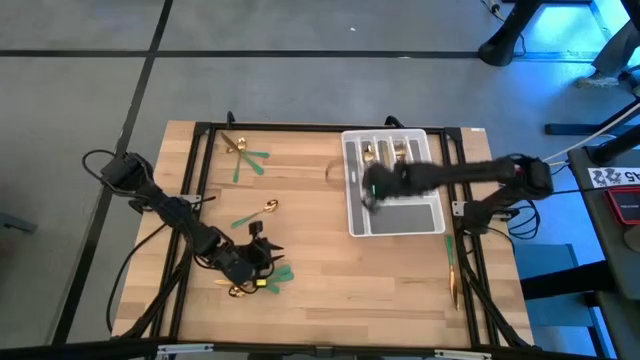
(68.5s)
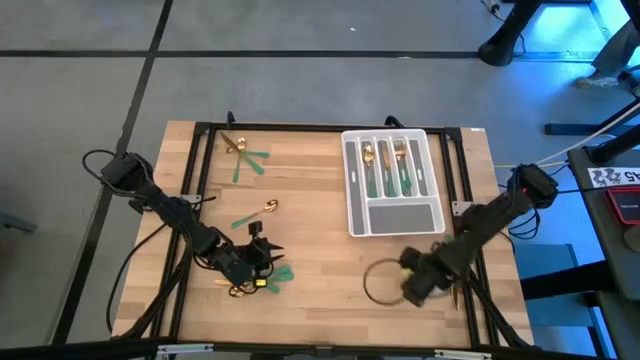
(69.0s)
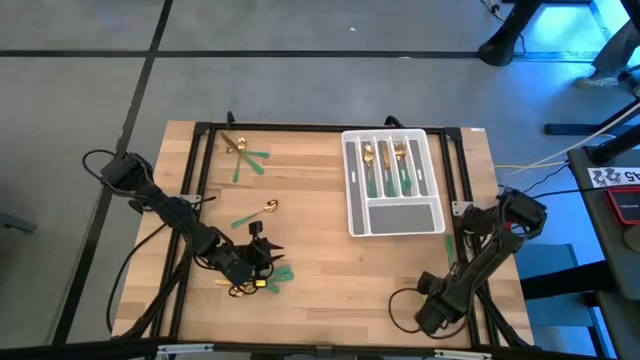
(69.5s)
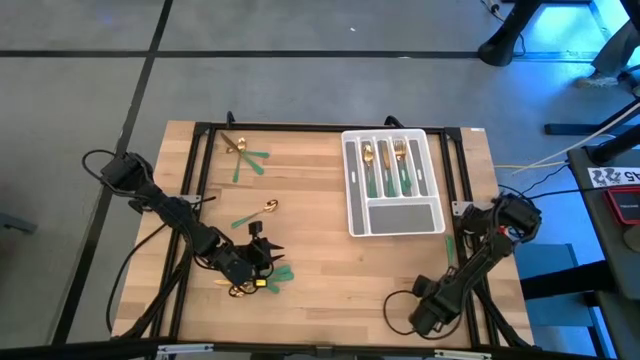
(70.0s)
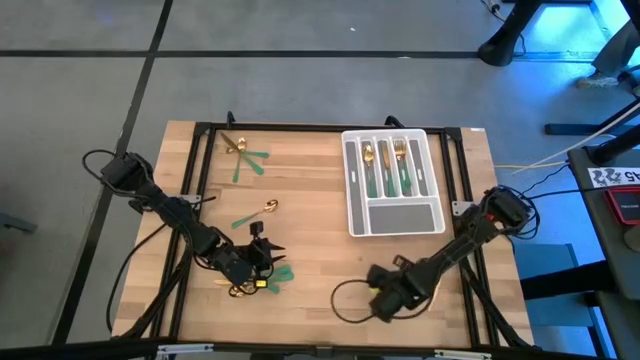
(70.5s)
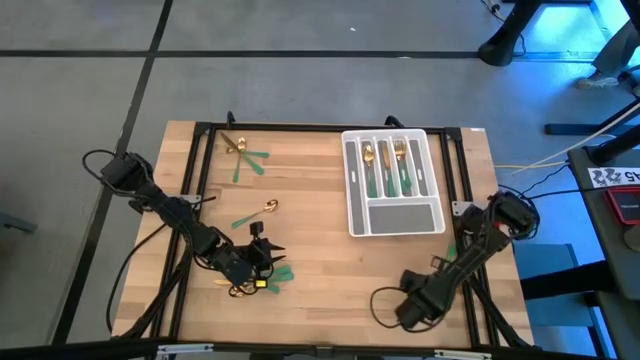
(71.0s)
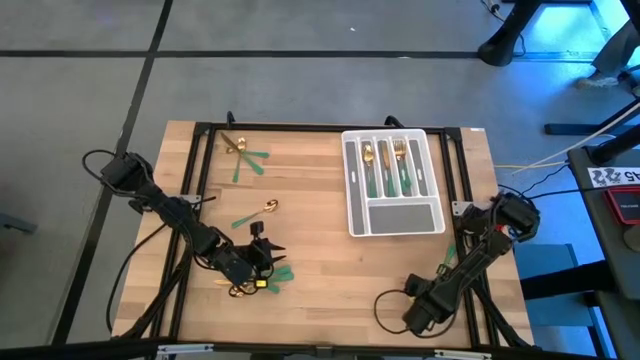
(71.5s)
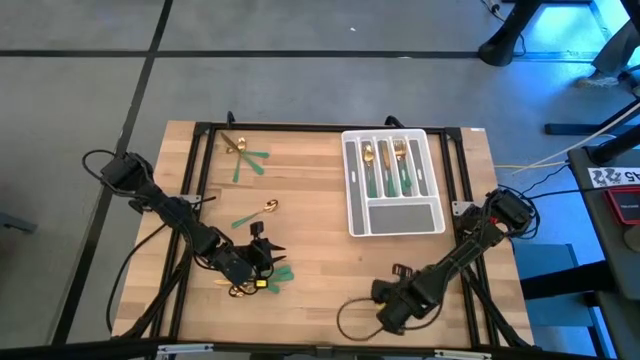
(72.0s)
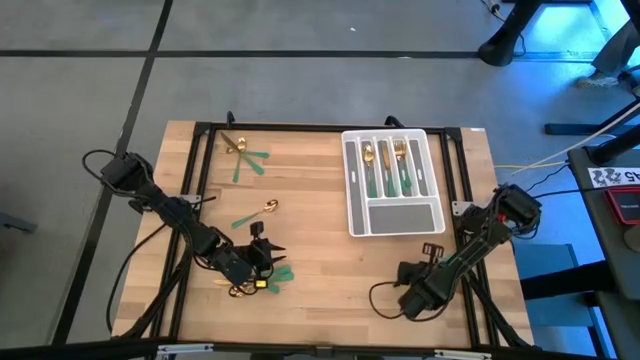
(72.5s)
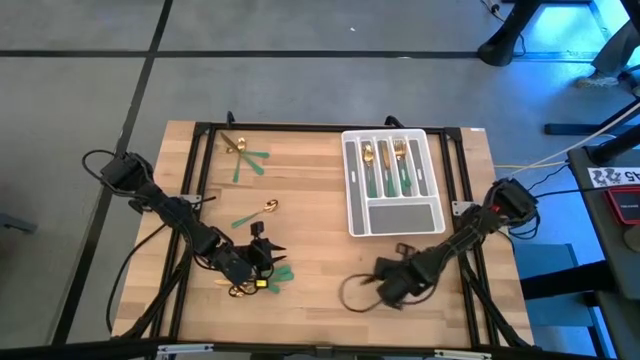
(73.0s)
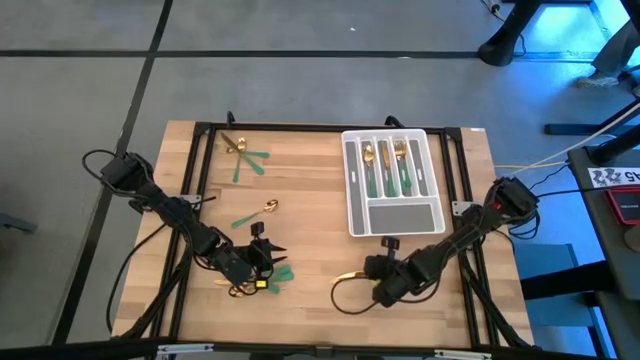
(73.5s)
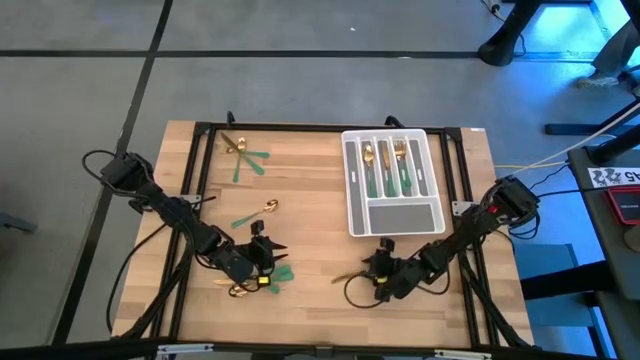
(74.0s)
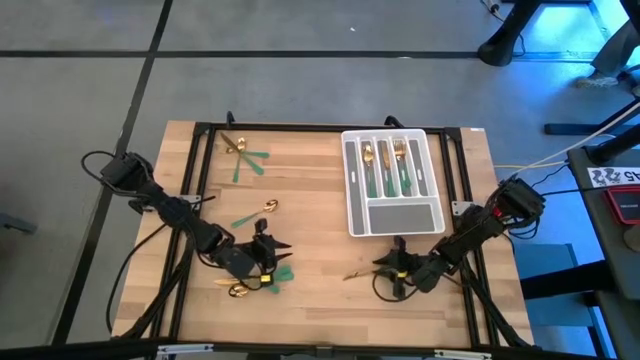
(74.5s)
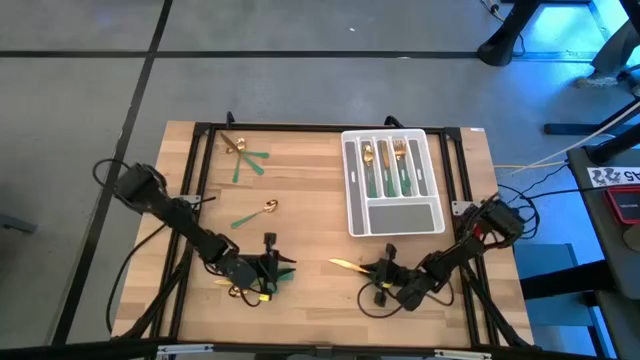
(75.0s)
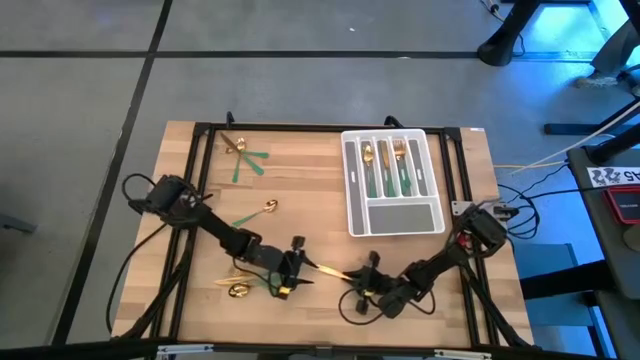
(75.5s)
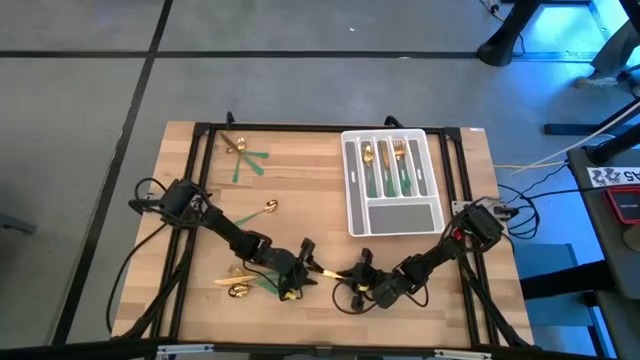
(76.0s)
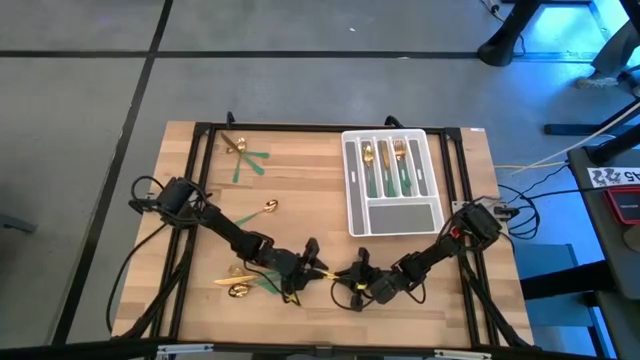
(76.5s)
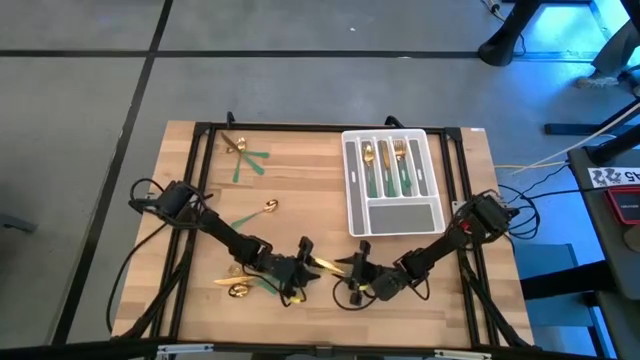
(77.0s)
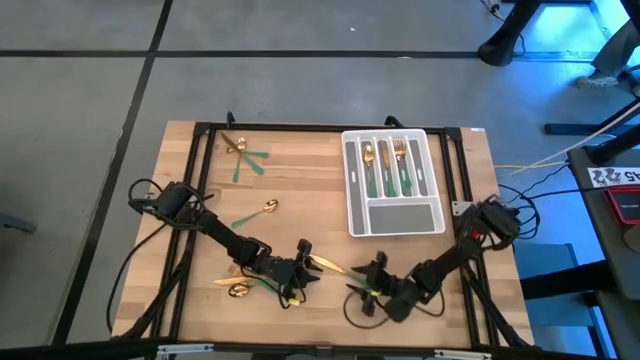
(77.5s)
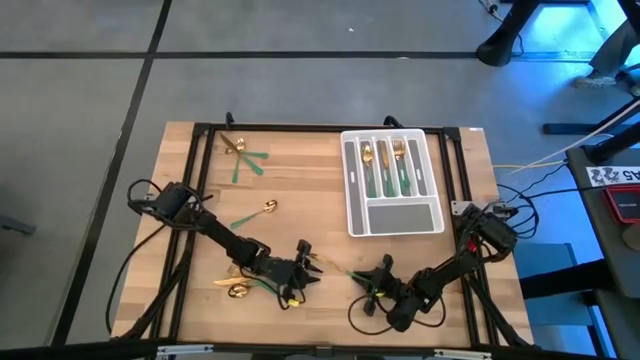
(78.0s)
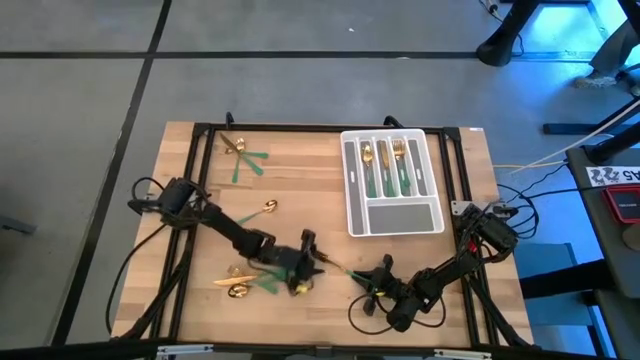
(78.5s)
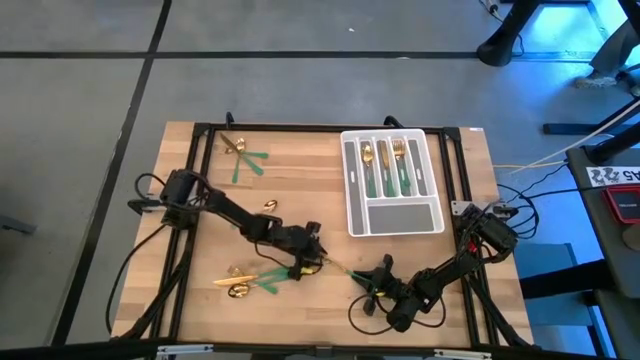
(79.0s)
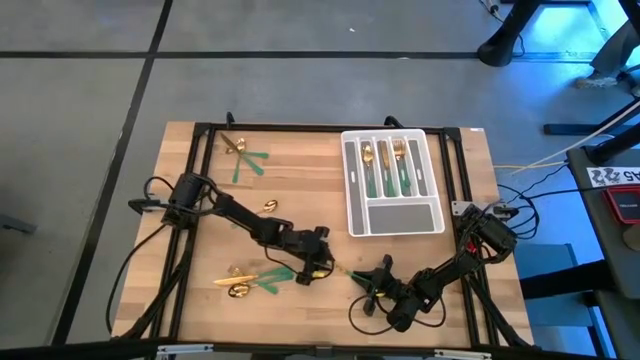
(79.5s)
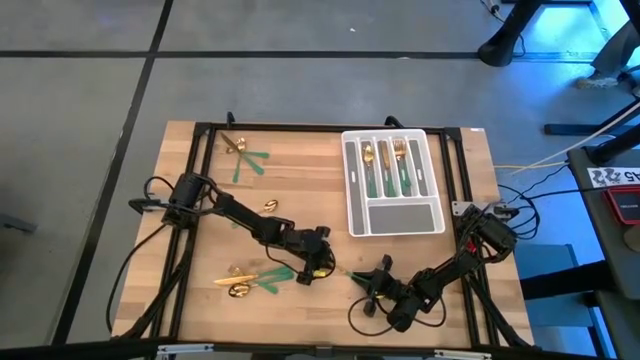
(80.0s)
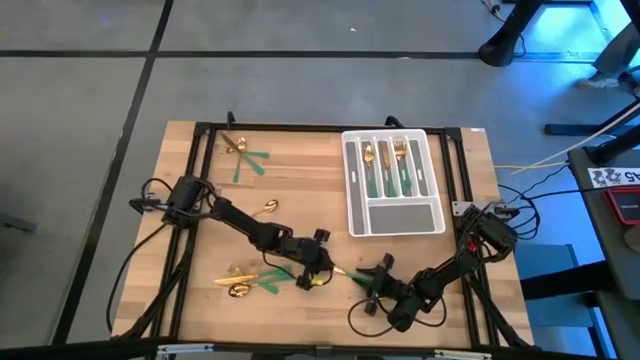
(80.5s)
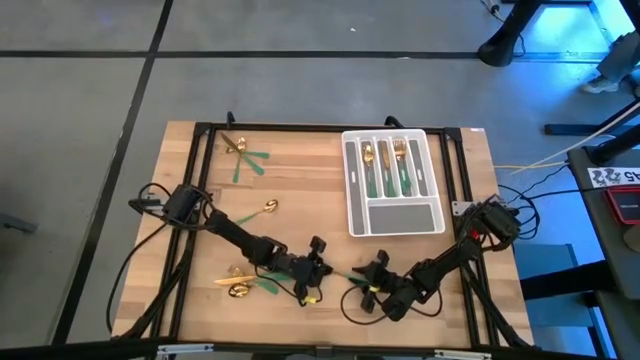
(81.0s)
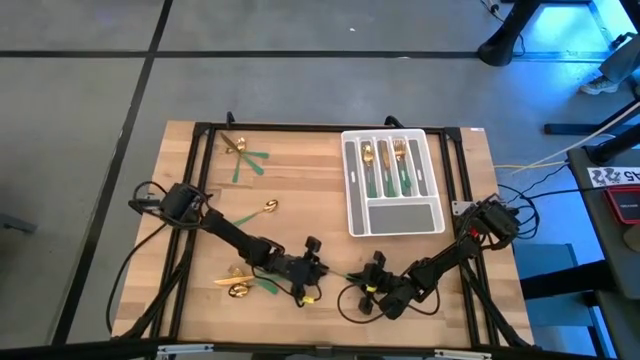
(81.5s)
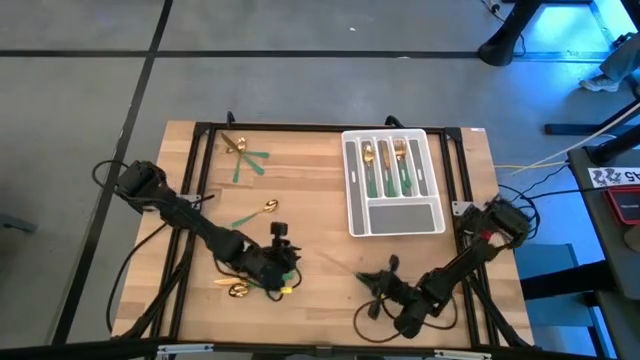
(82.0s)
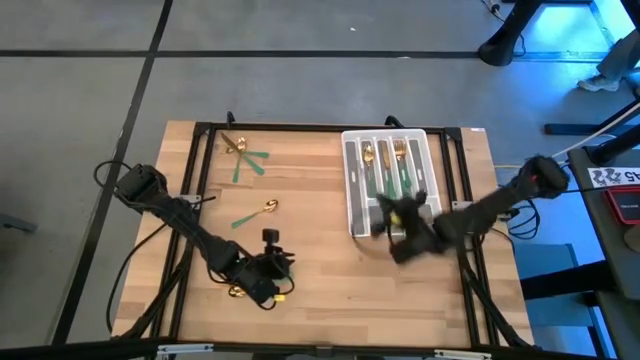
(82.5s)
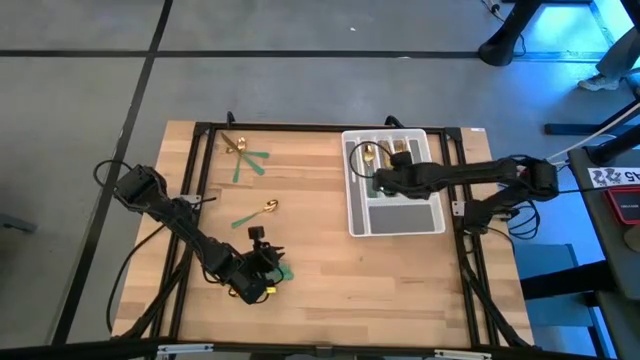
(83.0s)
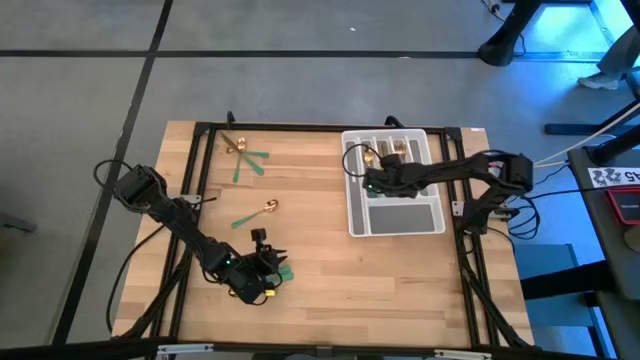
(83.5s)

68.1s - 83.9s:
Task: Sort silverware
Put the green table knife into the silverware tray

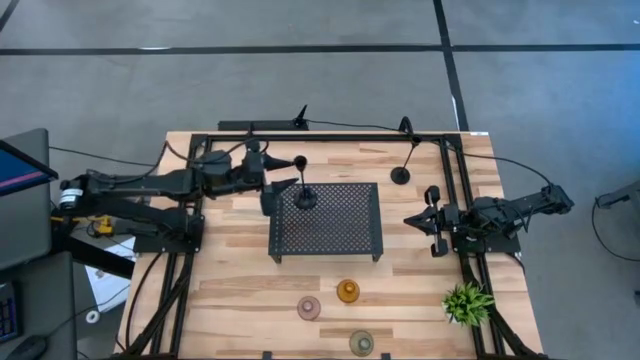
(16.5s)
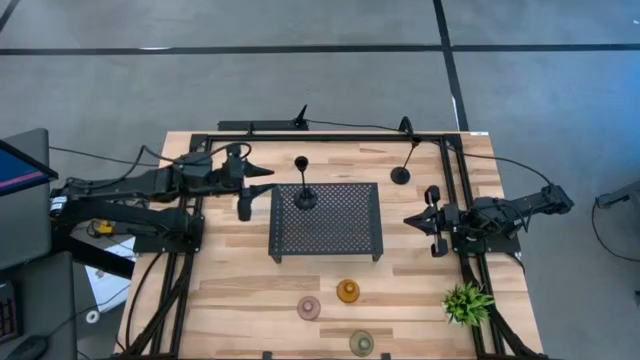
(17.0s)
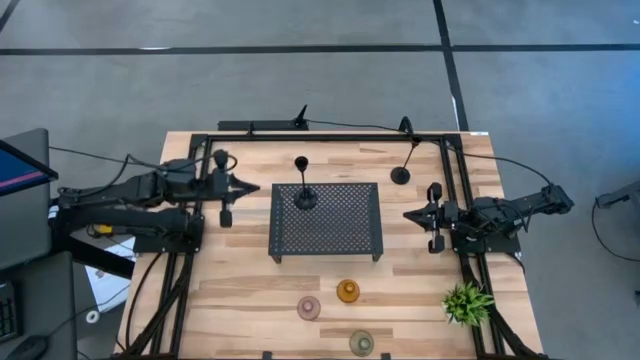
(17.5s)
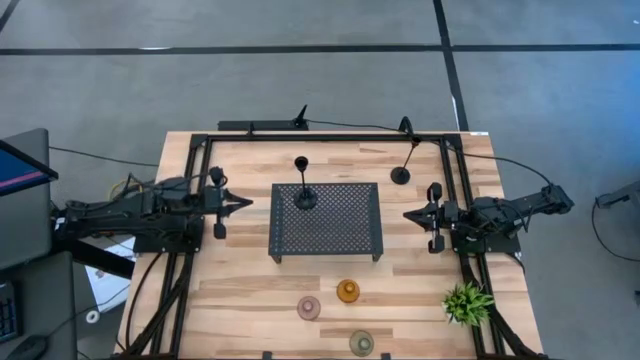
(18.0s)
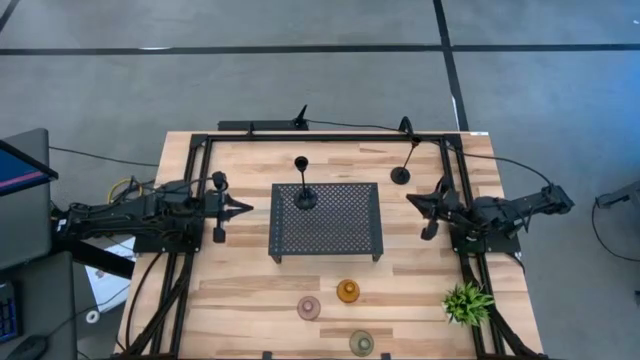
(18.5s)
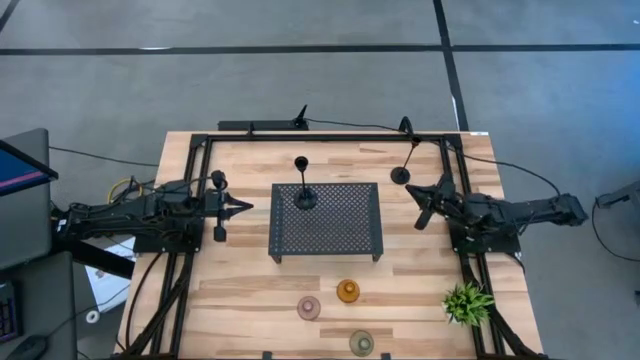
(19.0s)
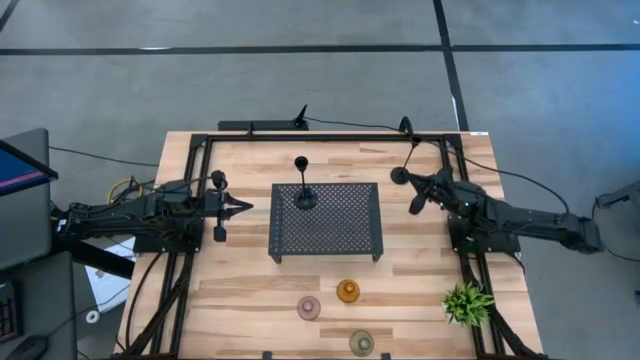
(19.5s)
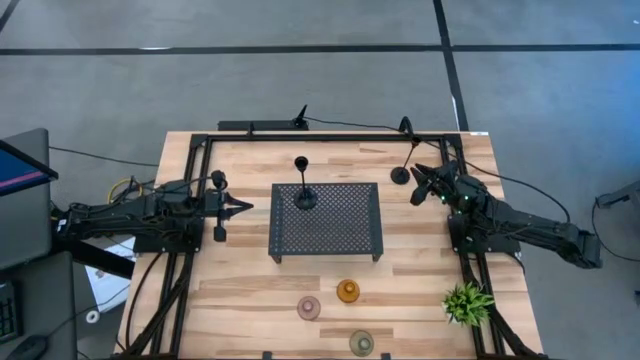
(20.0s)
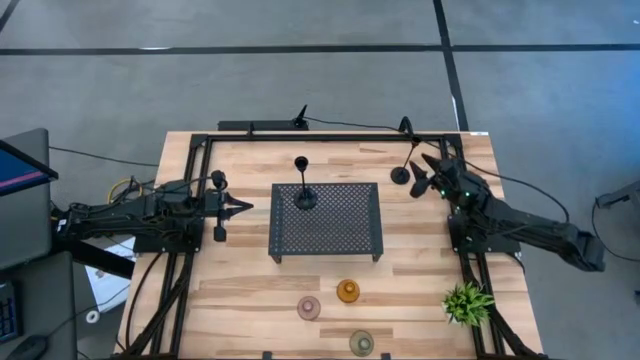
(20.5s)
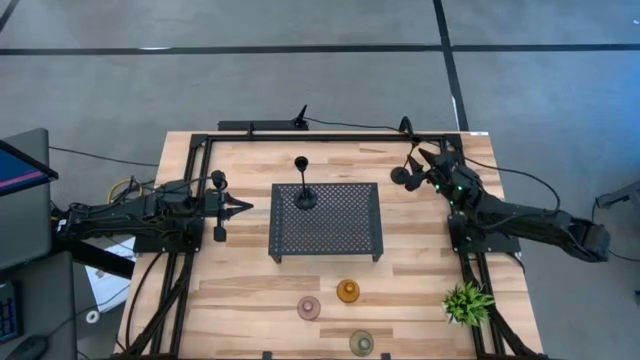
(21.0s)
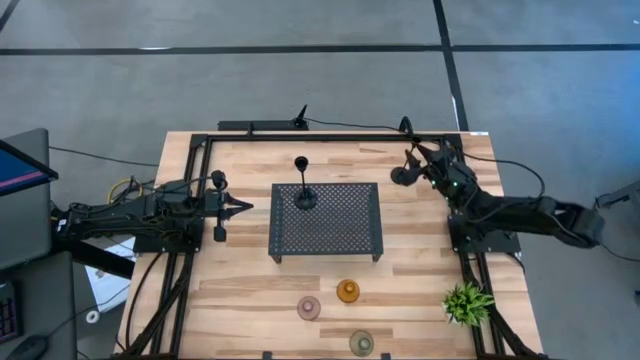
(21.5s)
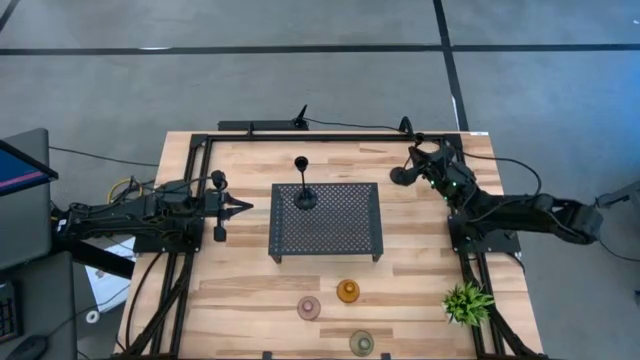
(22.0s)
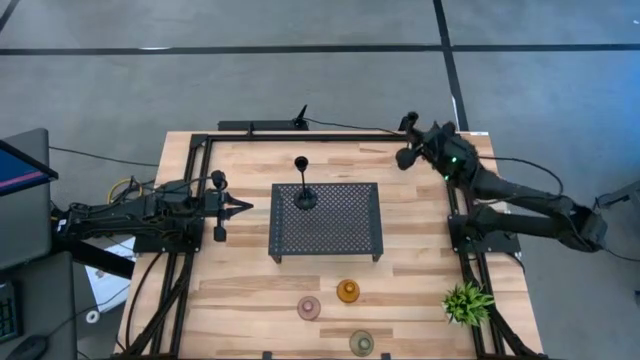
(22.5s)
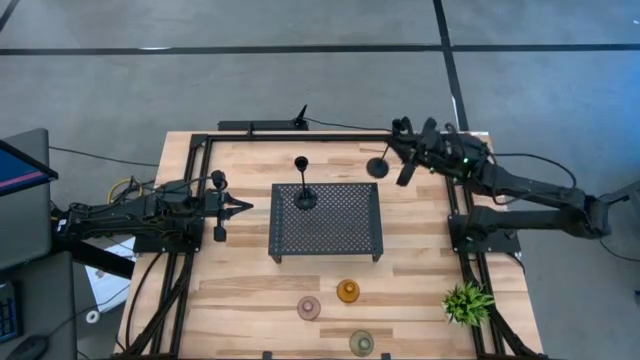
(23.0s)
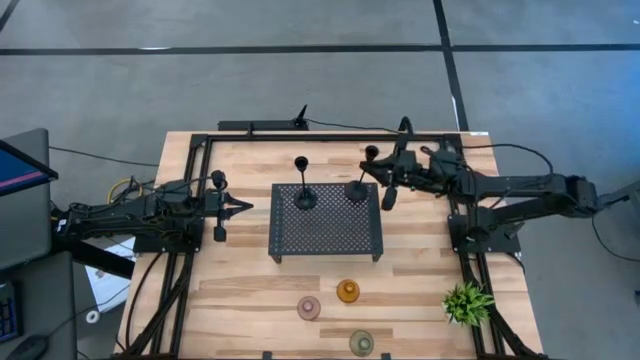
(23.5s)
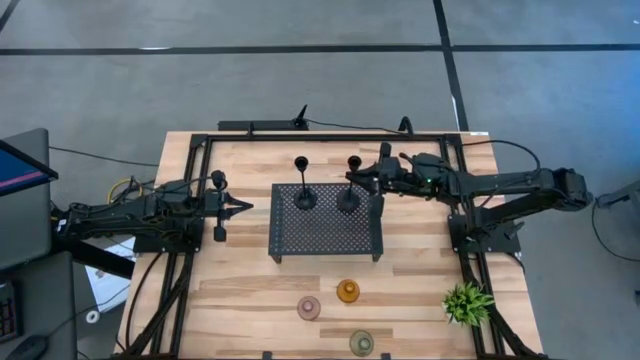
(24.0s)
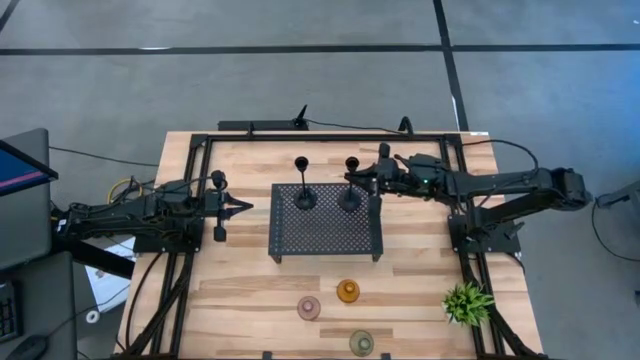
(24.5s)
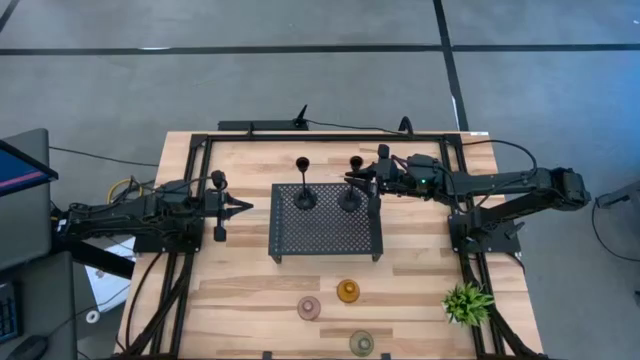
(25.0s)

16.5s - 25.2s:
Task: Pick & Place candle stick holders
Align the black candle holder with the black candle holder on the shelf
